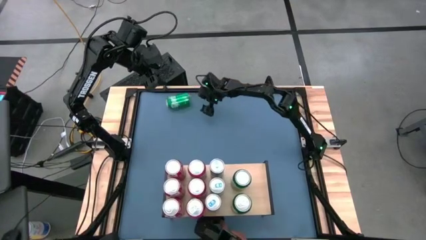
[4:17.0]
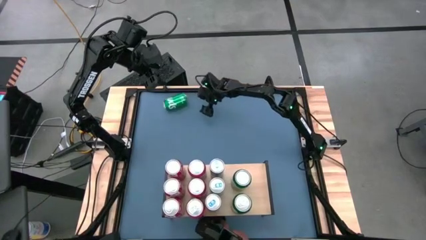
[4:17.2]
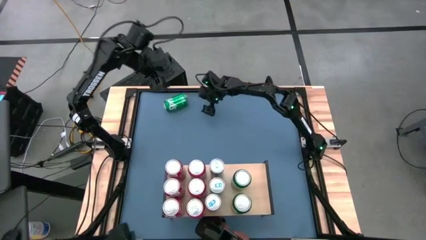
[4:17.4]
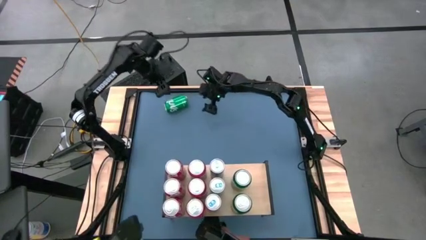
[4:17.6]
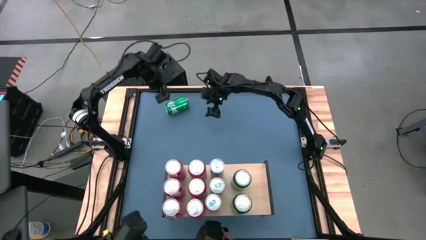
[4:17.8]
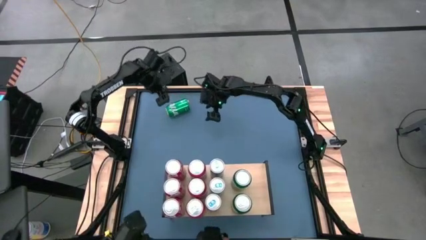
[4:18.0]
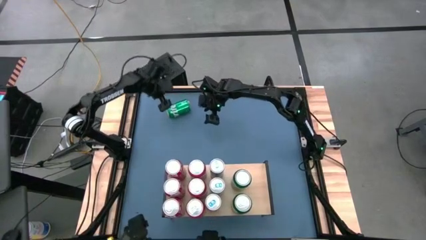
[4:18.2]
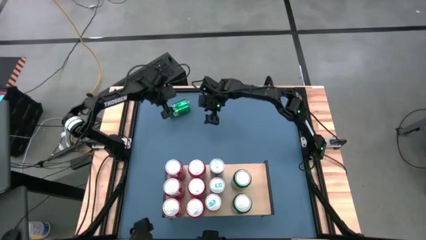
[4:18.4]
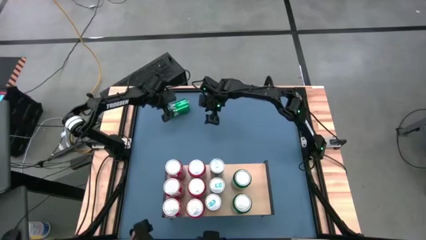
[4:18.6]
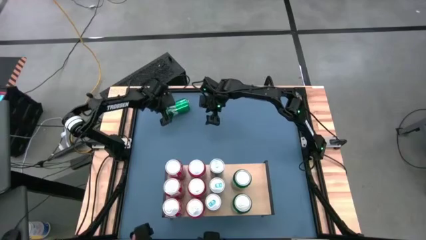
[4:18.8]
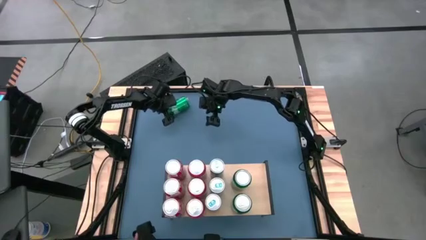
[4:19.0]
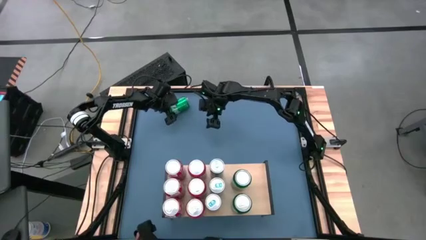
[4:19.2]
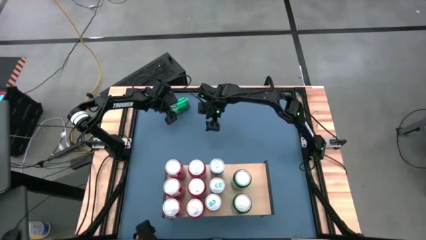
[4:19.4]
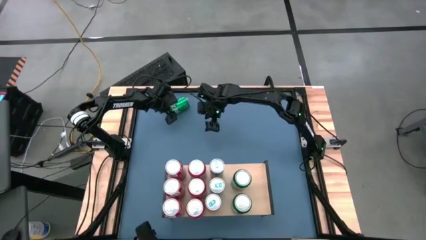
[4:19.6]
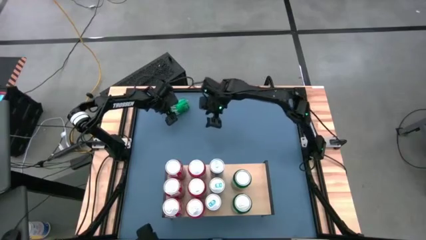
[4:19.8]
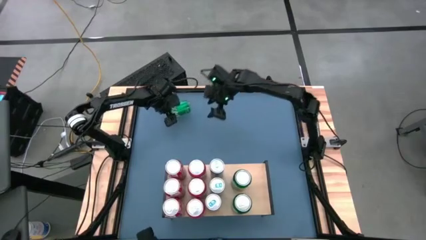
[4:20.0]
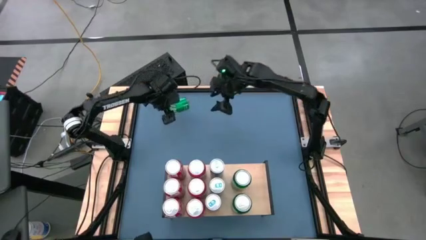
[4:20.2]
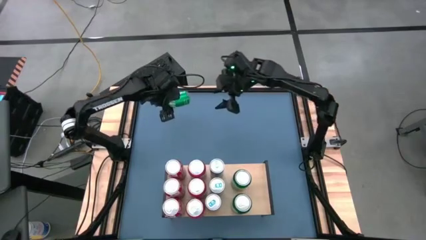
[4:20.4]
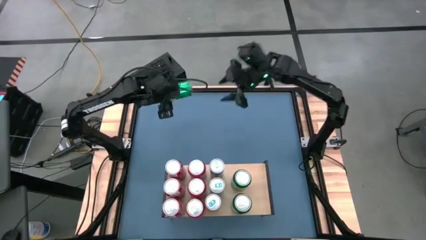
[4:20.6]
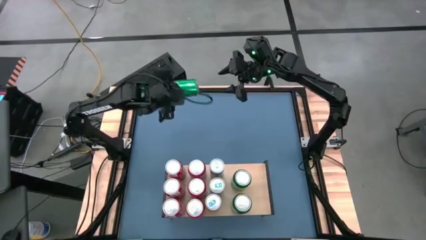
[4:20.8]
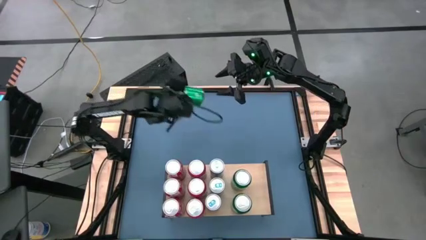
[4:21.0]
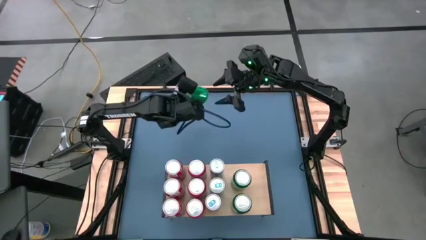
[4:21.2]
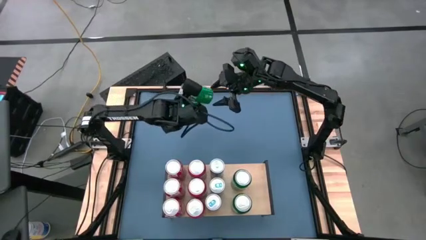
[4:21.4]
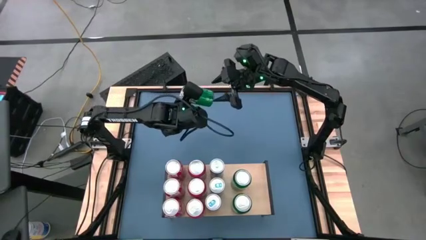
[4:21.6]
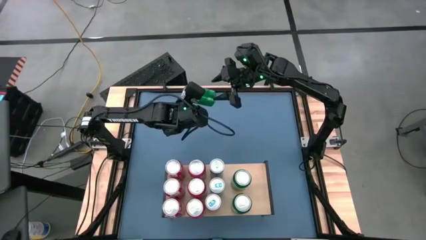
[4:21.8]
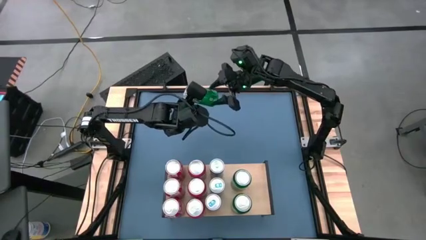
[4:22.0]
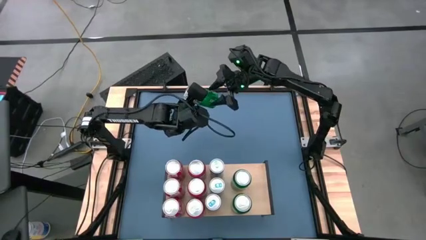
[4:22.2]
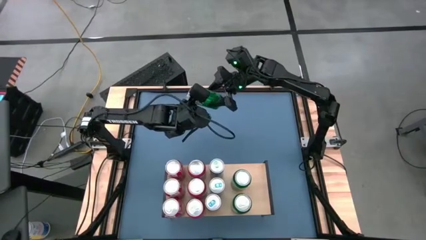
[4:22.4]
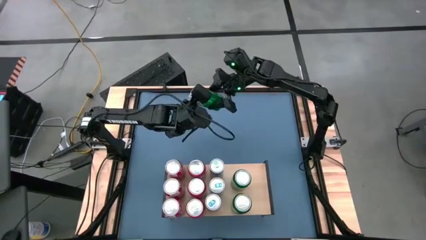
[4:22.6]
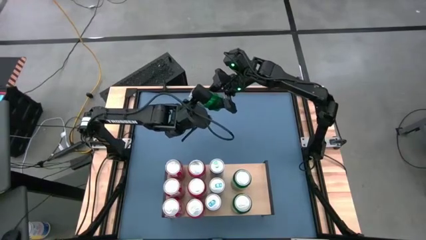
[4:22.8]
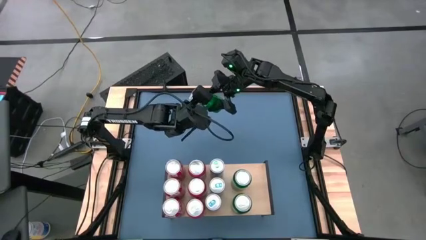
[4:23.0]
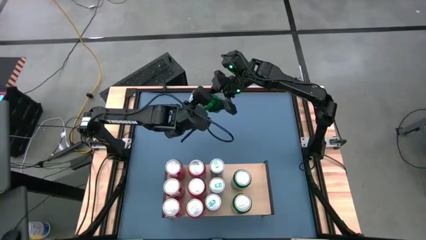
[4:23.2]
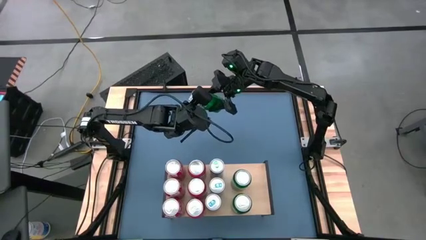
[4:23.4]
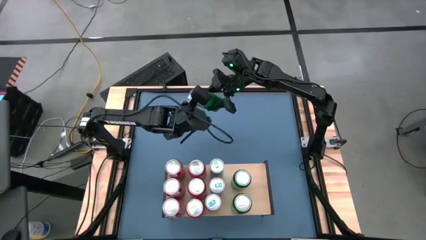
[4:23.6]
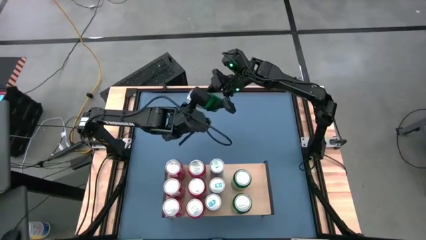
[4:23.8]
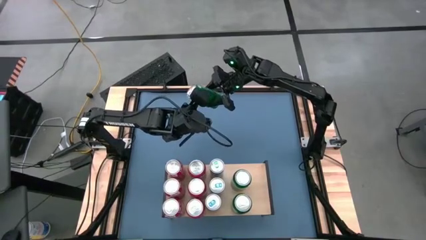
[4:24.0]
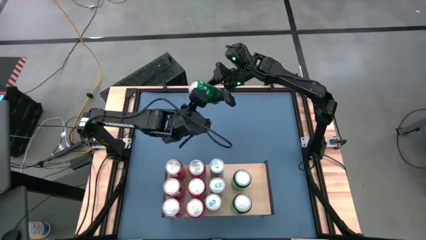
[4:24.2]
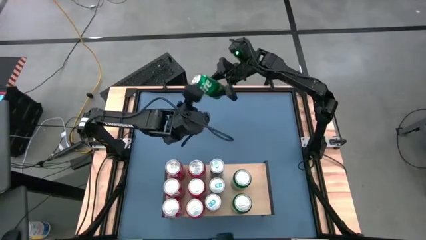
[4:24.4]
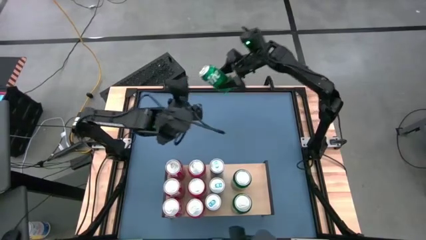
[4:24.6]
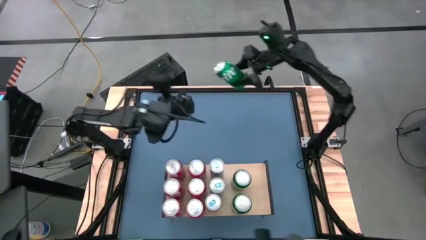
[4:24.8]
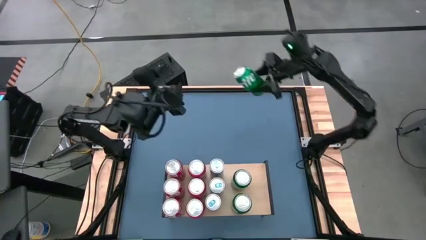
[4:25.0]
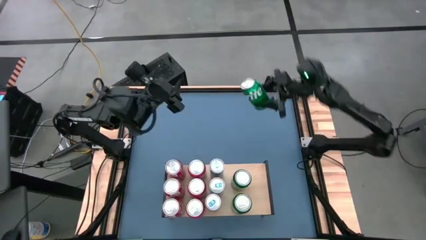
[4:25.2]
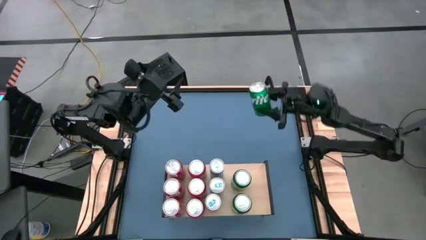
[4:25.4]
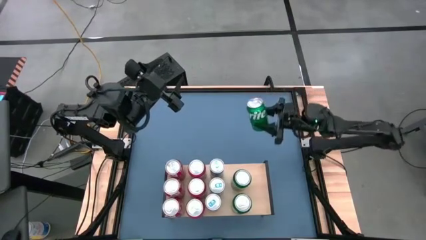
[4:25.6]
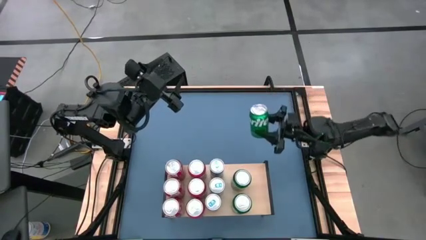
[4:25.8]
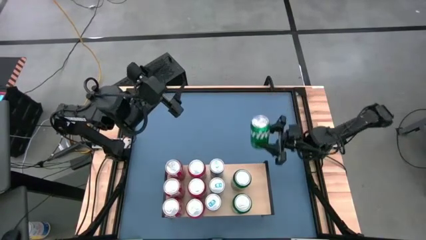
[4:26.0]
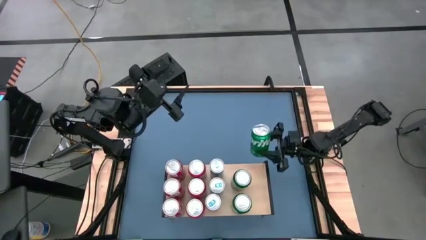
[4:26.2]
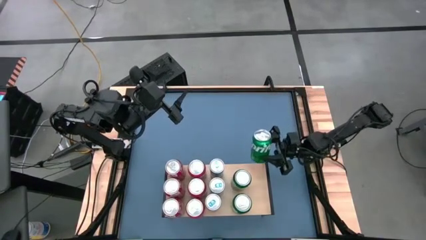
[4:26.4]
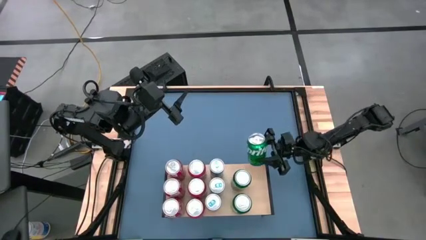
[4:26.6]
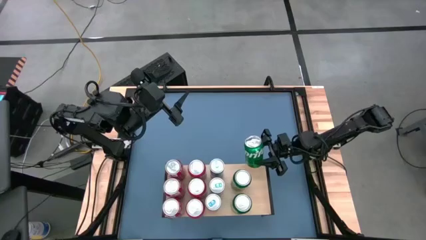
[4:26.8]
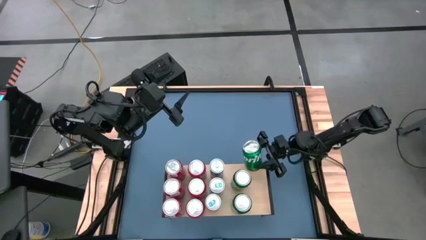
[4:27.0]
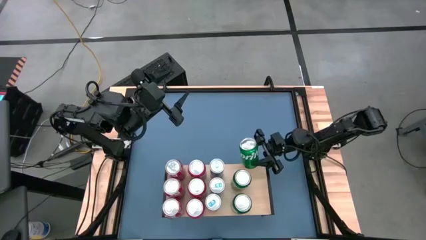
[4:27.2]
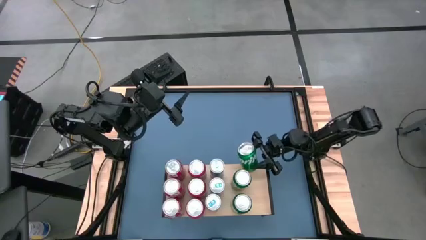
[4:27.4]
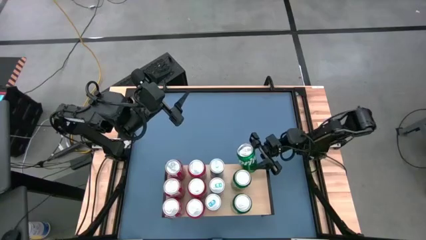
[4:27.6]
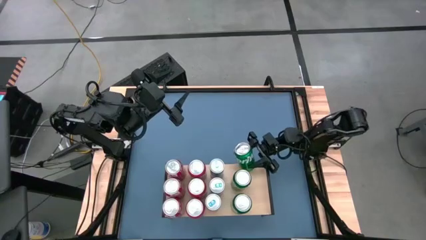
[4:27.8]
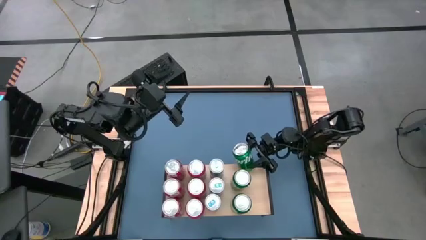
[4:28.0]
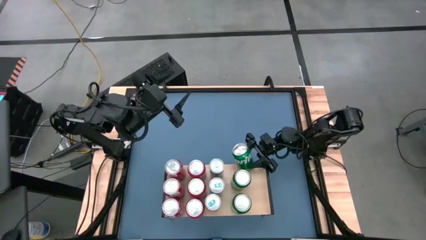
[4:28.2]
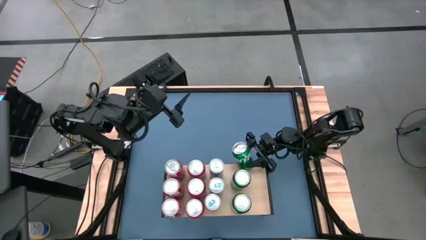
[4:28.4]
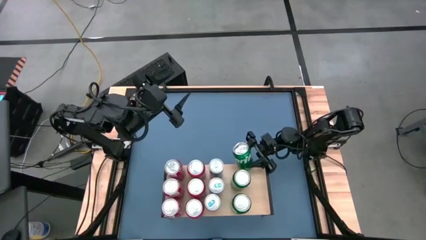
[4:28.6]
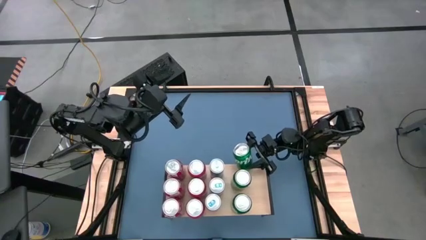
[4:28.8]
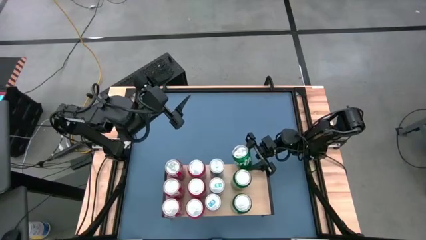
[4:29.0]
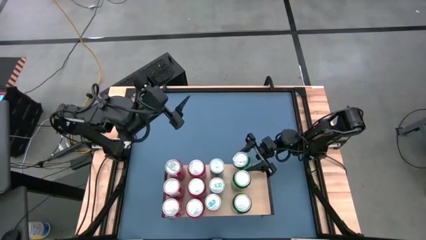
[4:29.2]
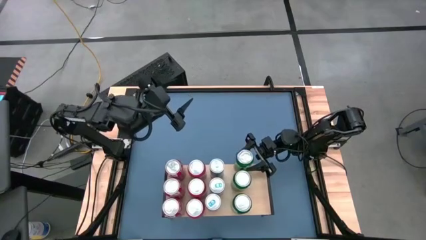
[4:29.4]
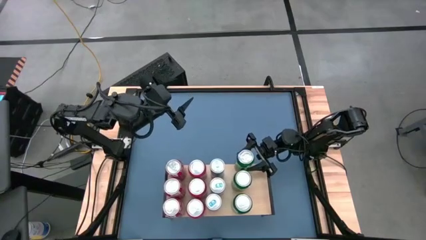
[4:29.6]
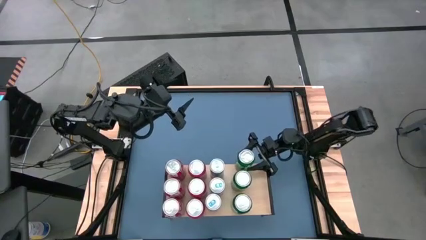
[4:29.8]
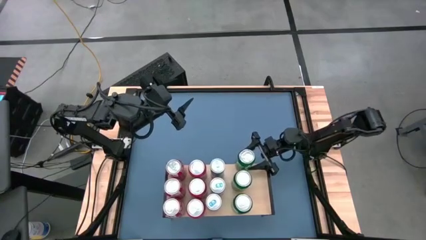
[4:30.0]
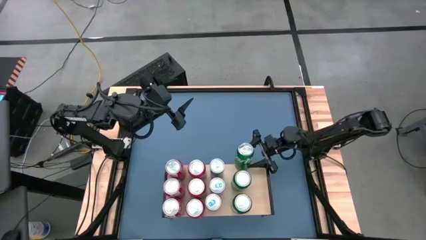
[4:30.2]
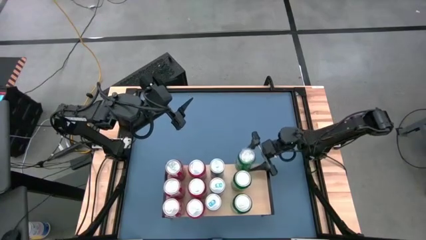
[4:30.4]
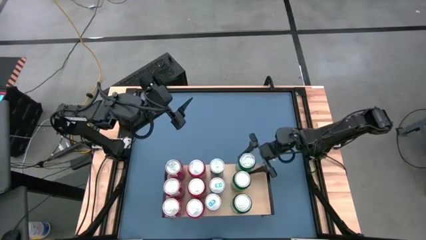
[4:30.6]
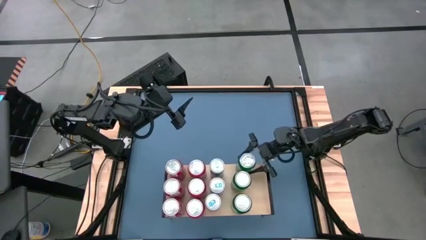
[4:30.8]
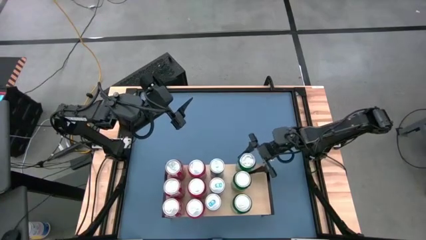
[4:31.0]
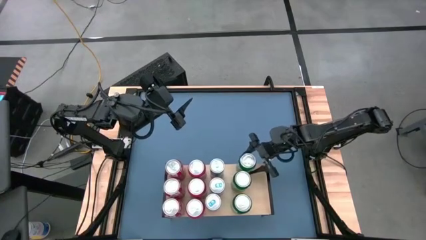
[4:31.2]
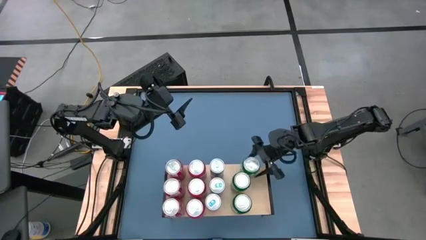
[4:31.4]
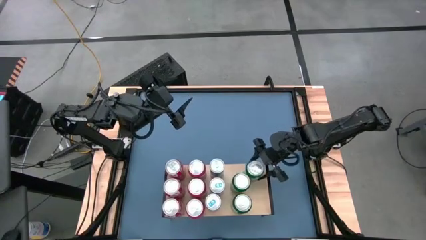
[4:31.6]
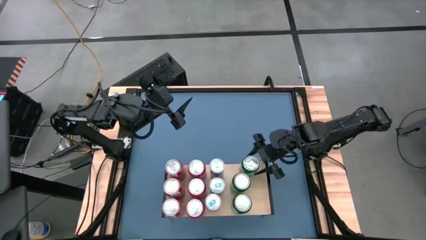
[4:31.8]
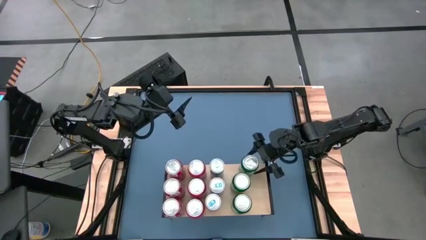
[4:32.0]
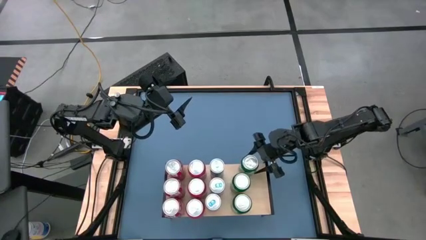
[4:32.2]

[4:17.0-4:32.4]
Task: Place canned beverage on shelf
Put the green soda can on the shelf
